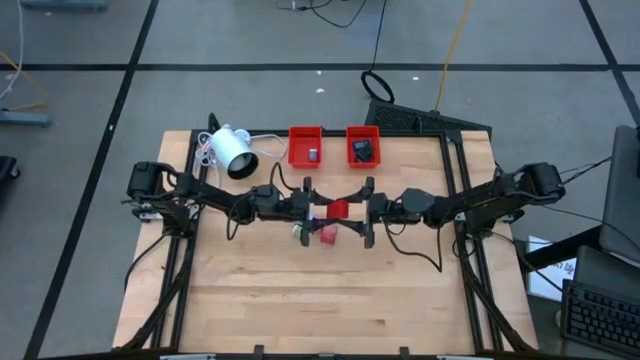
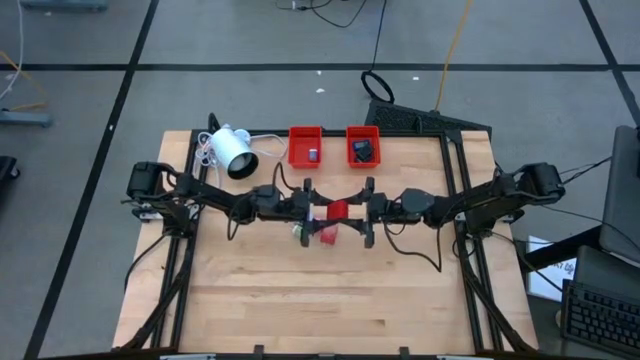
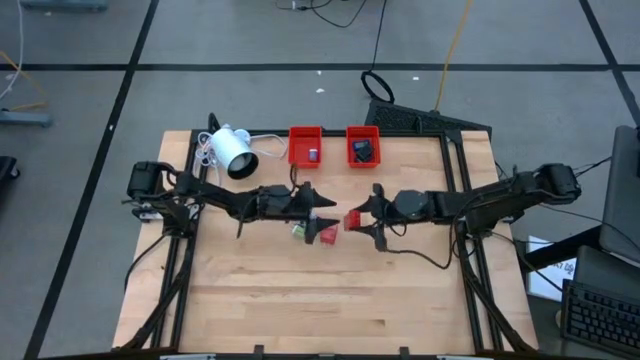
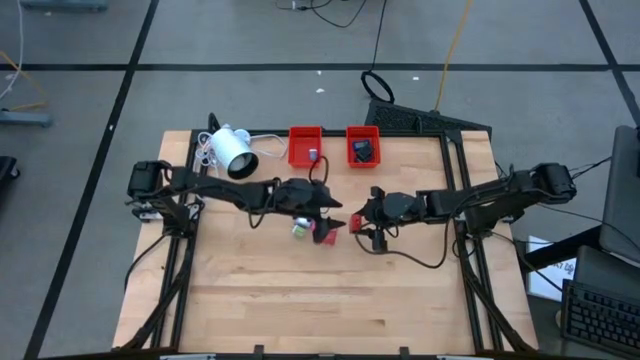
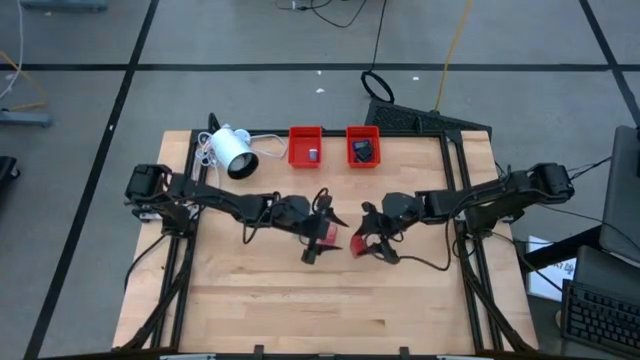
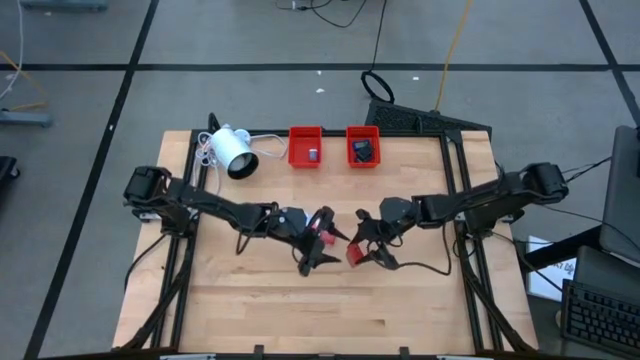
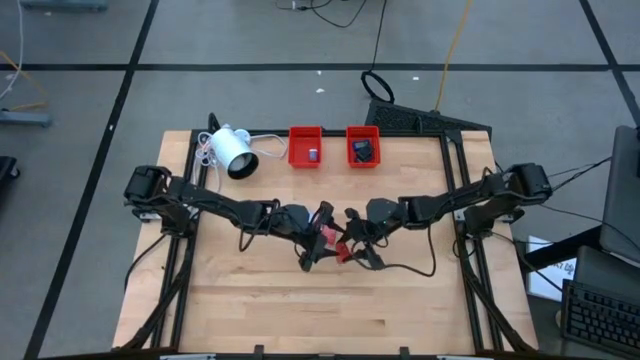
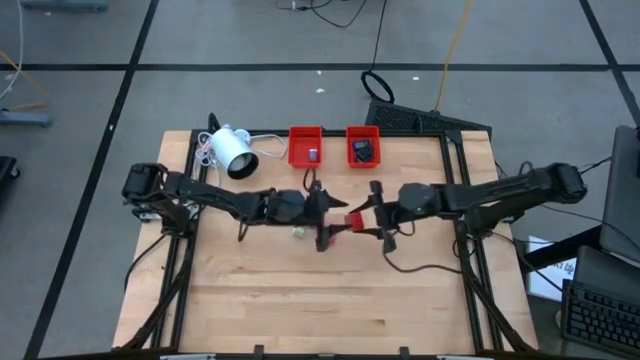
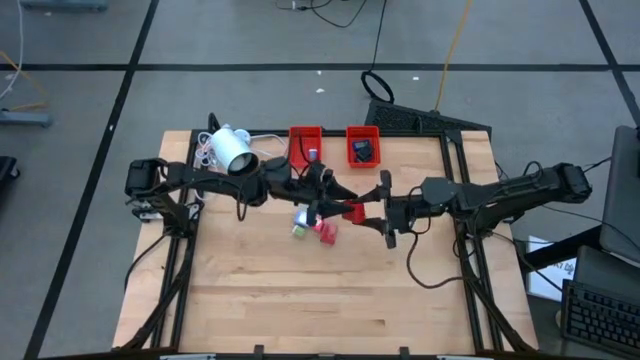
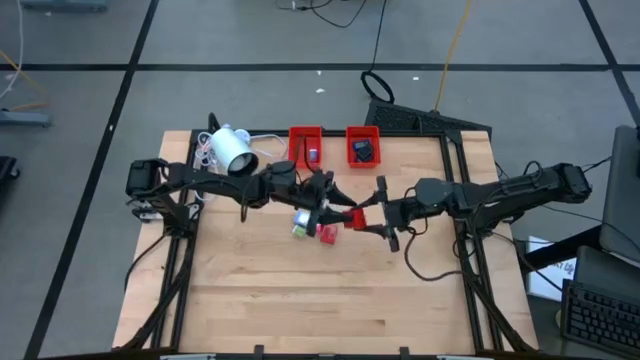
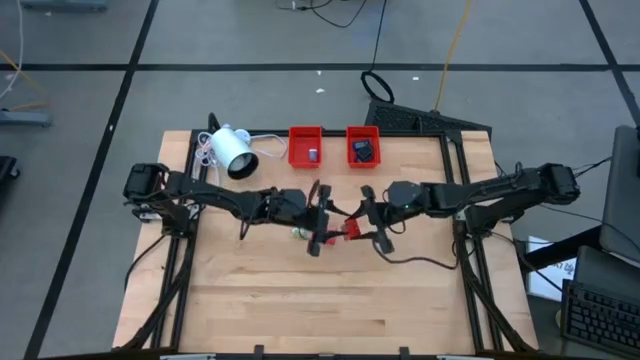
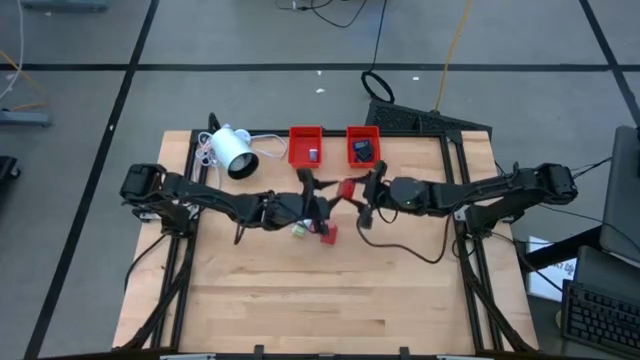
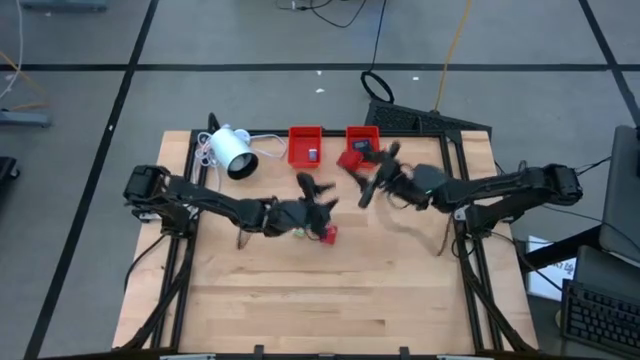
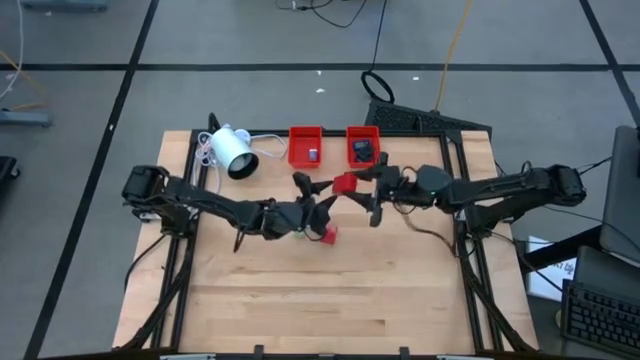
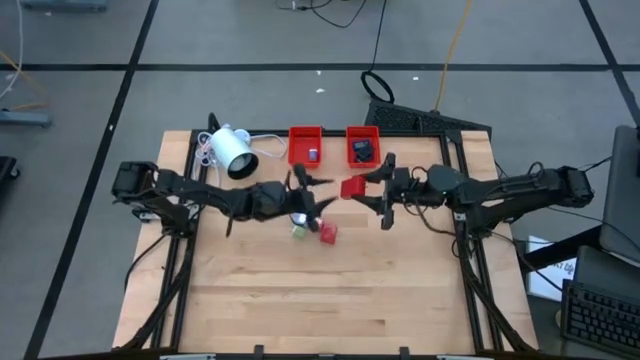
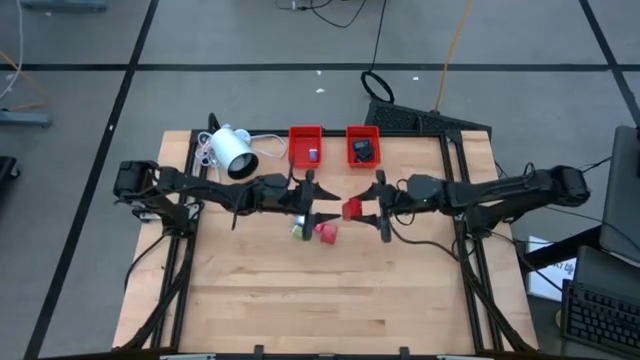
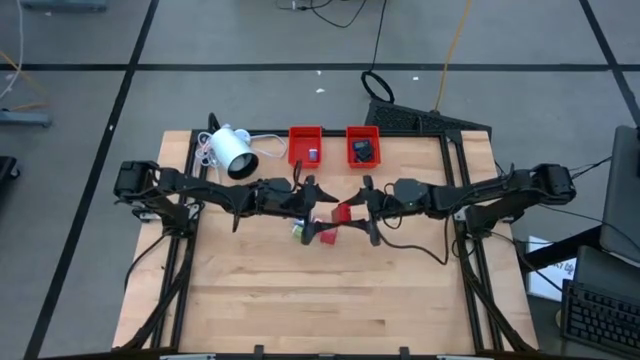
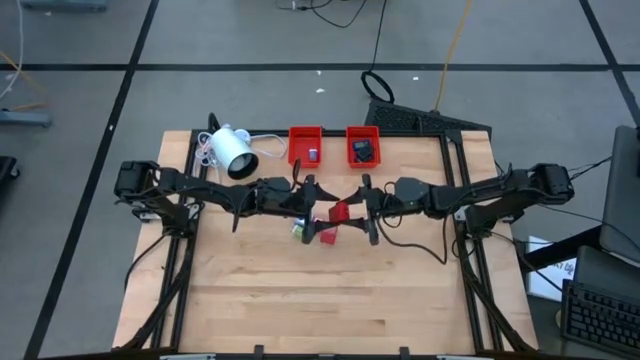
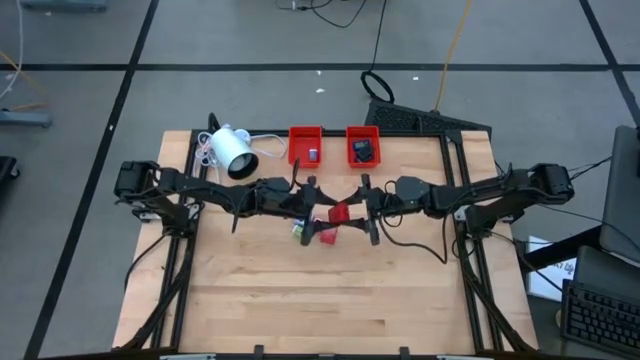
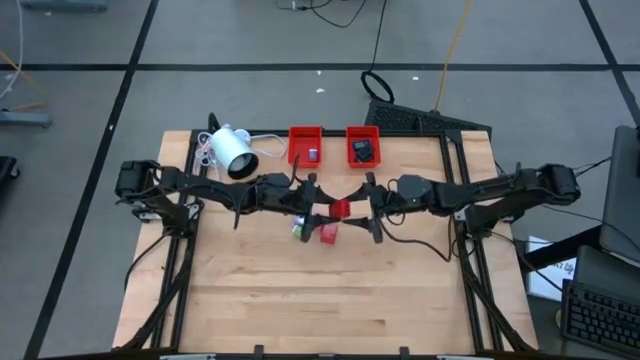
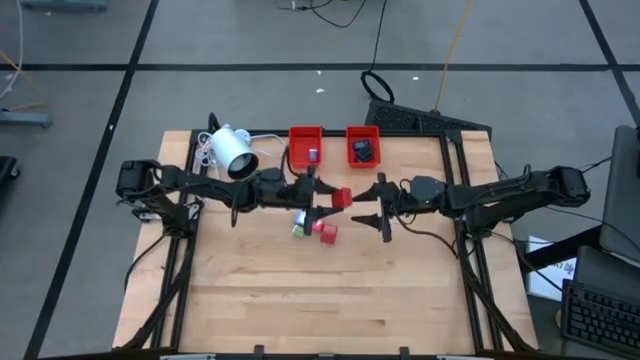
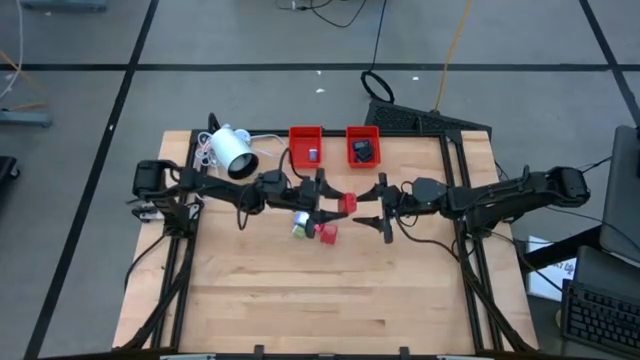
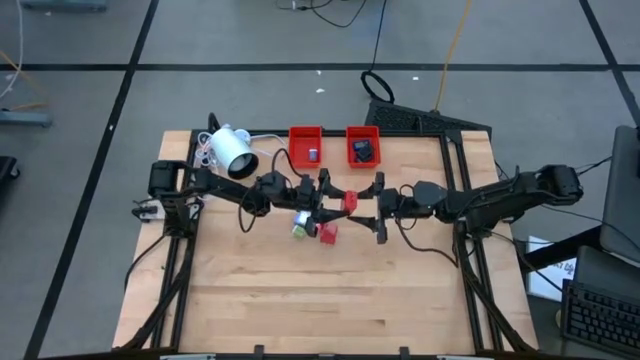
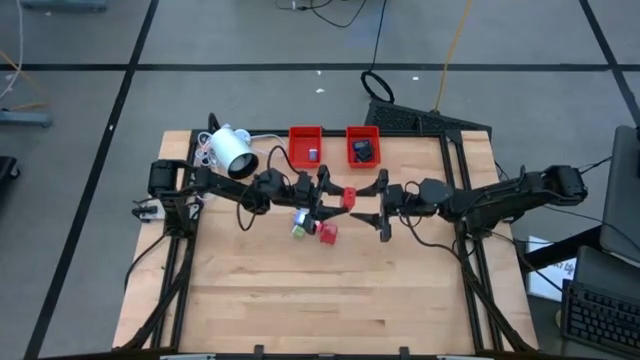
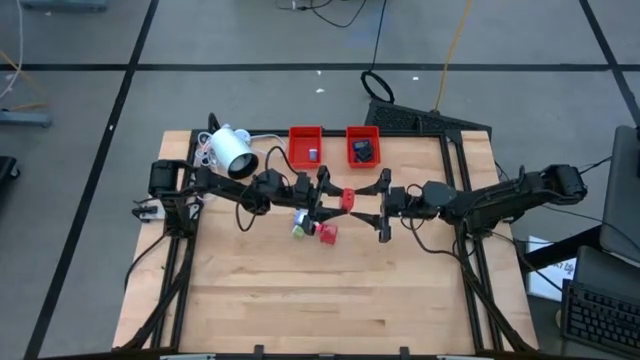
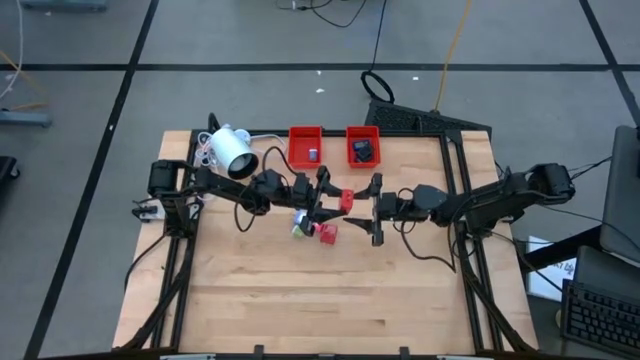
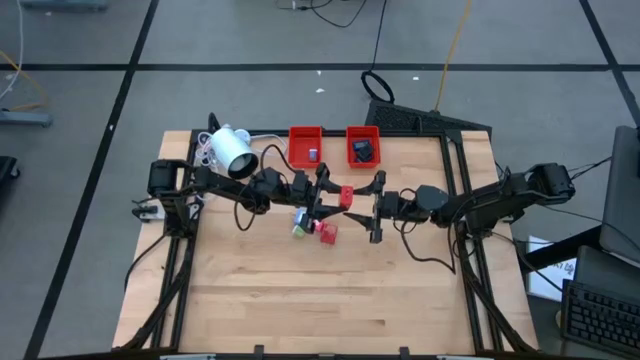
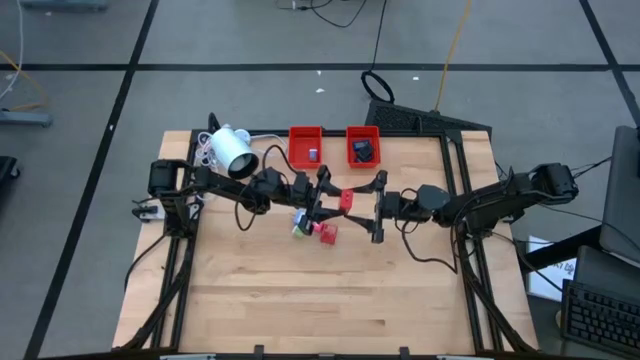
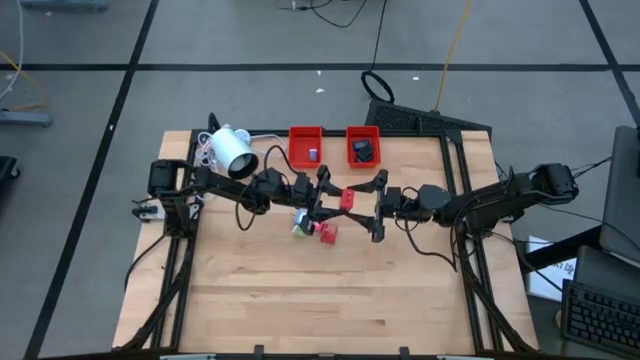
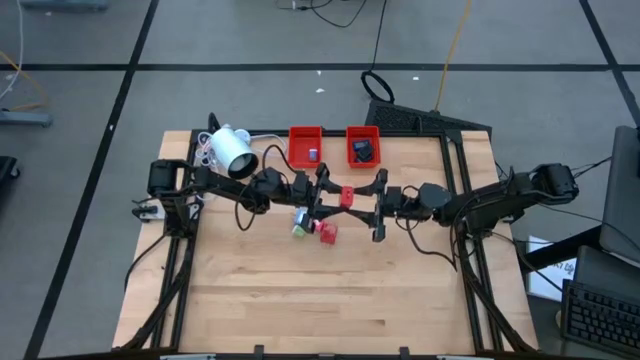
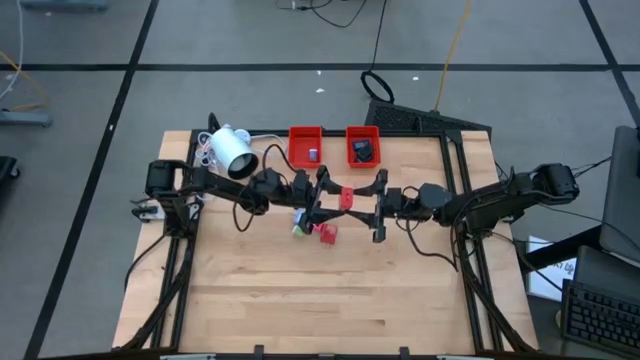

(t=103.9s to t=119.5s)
Task: Pick & Place Office items
Put the bottom red charger adapter into the left red bin

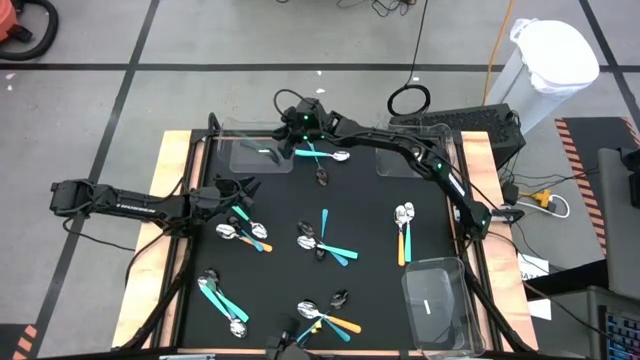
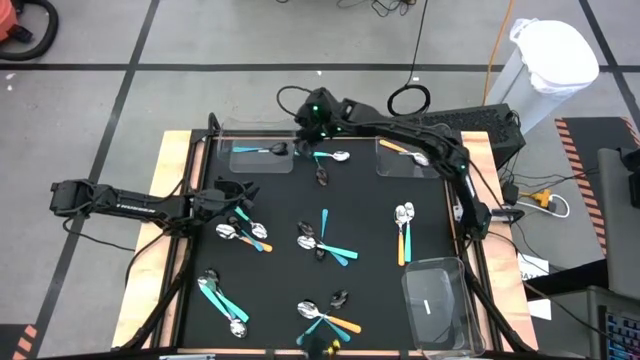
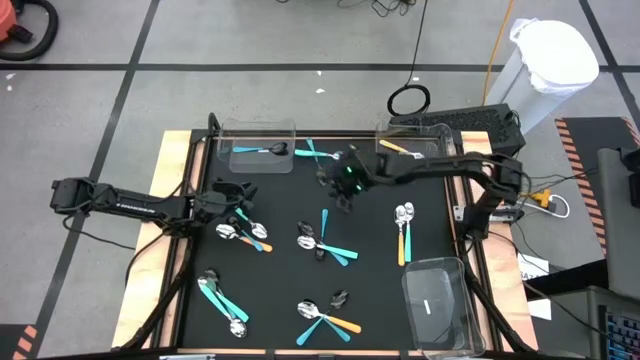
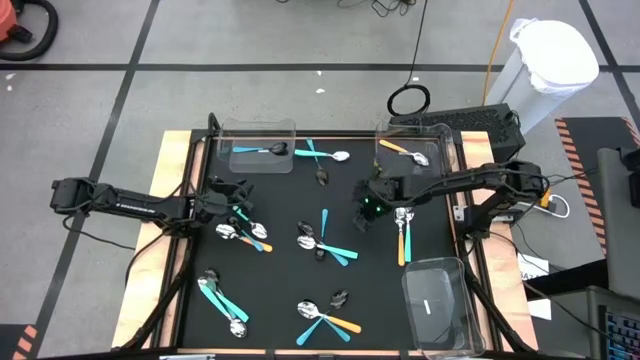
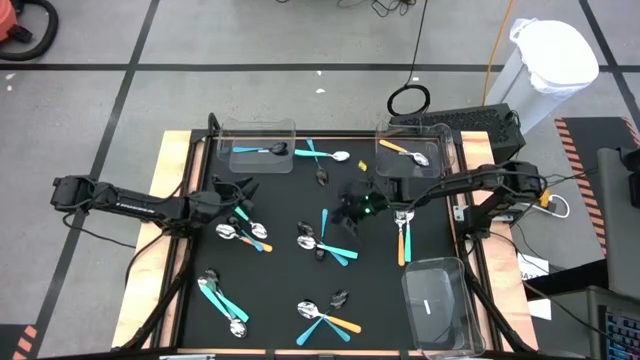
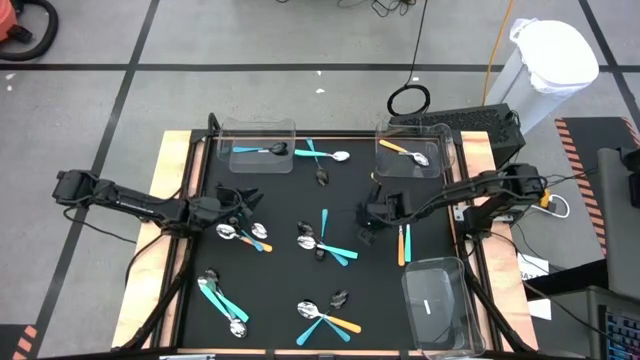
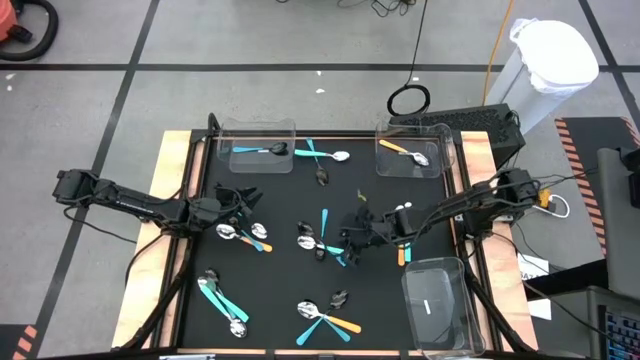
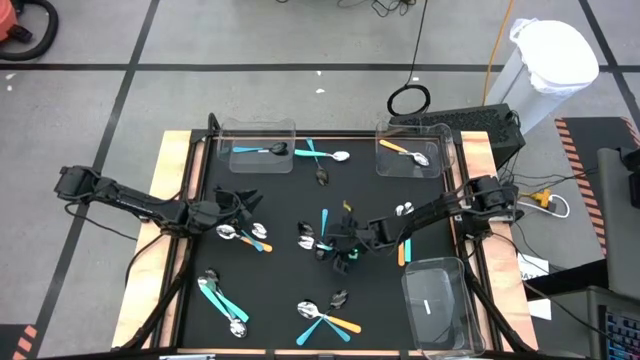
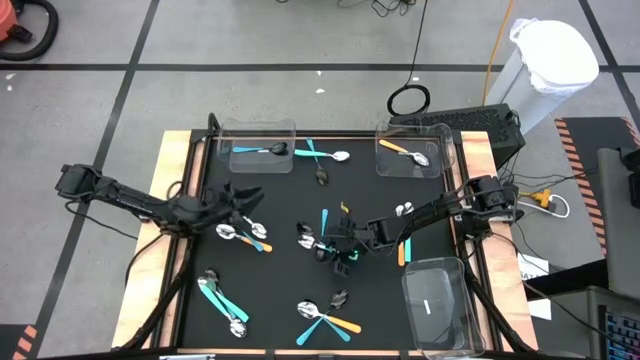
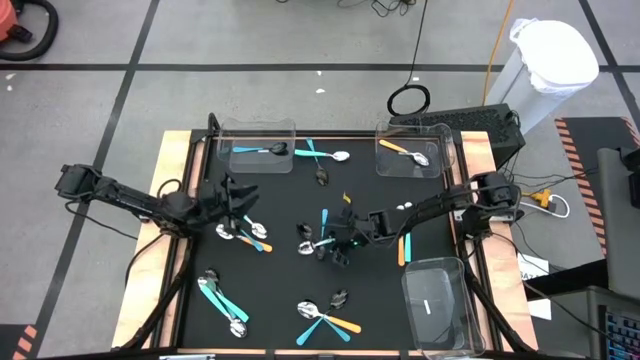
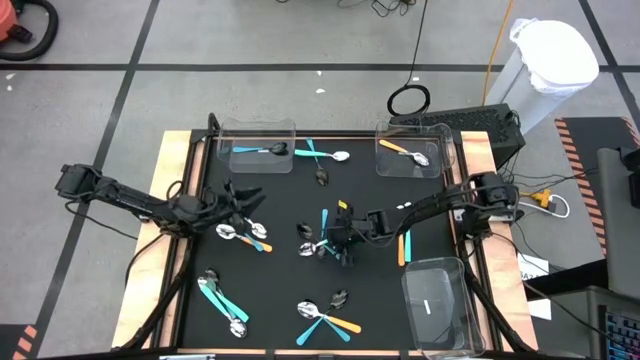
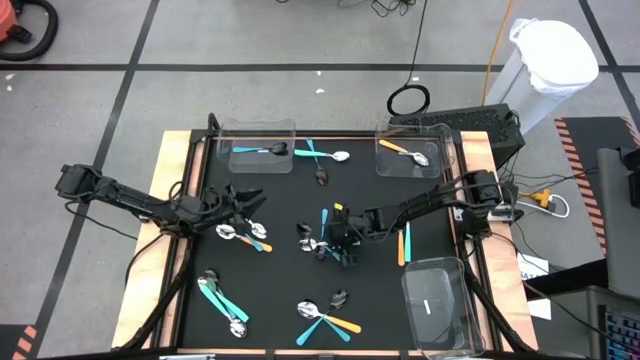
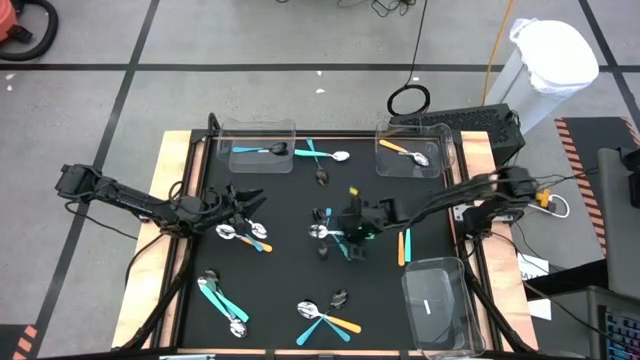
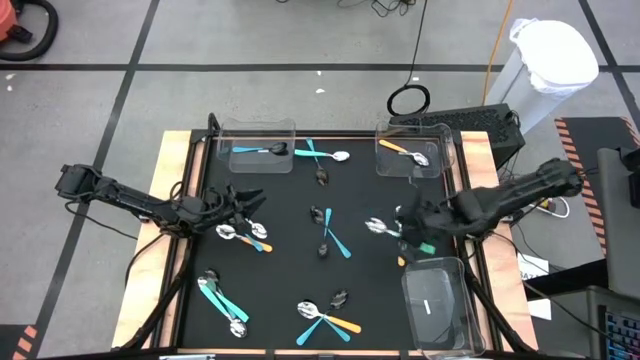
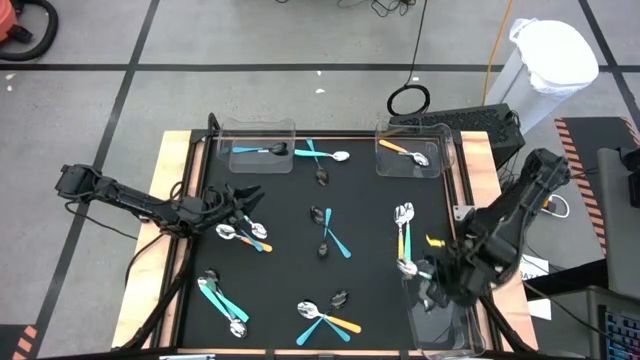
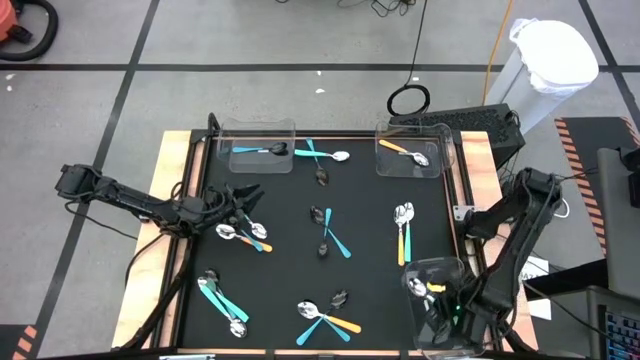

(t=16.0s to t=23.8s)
Task: Sort silverware by color (type)
Put the light blue spoon into the bottom right transparent bin
